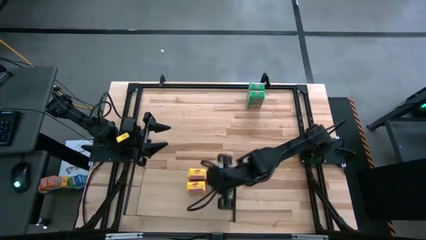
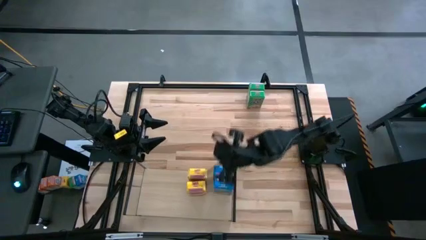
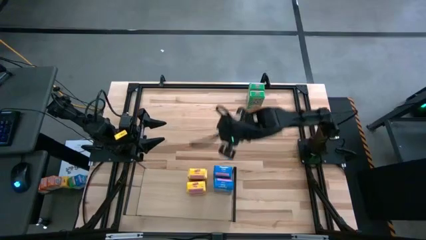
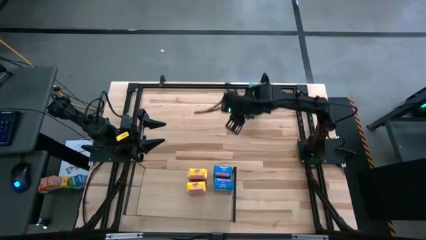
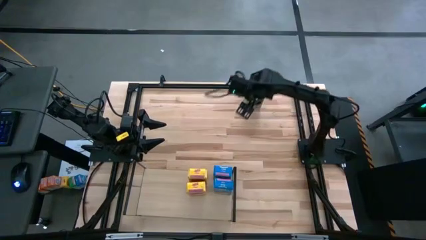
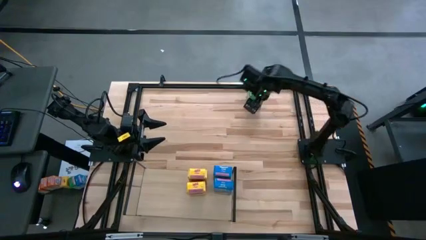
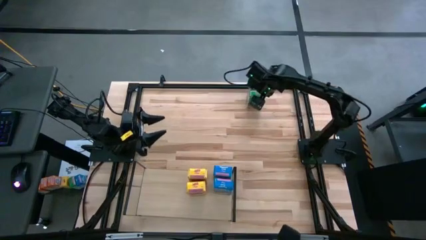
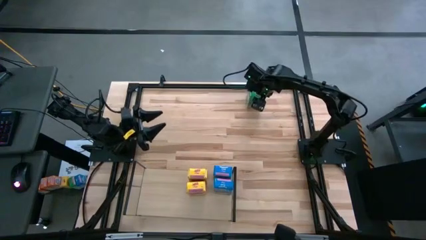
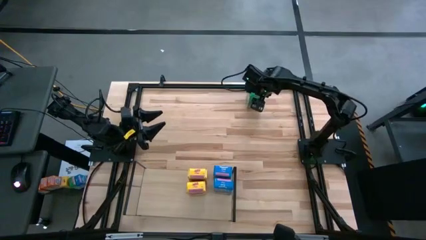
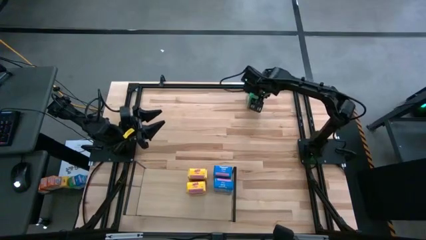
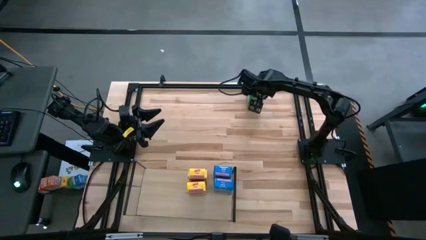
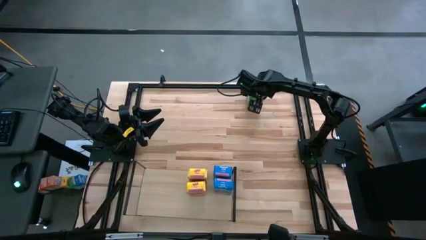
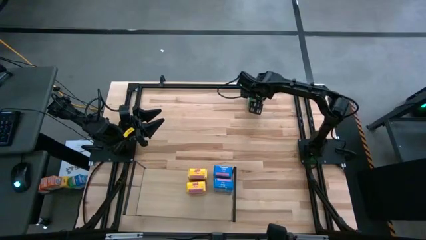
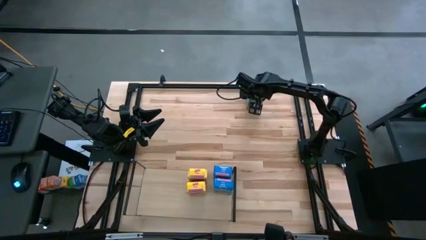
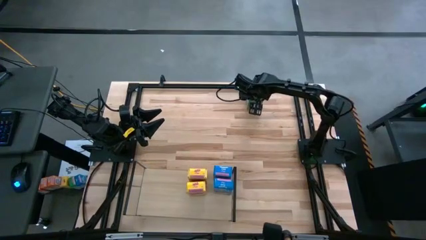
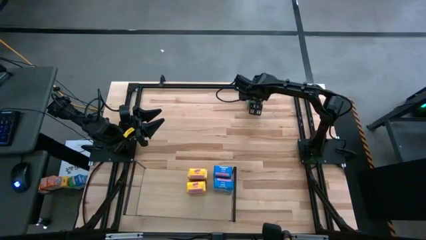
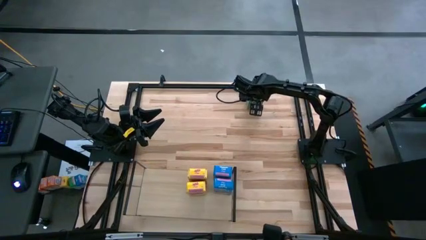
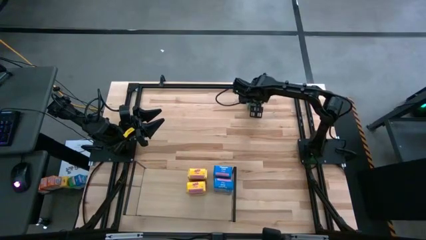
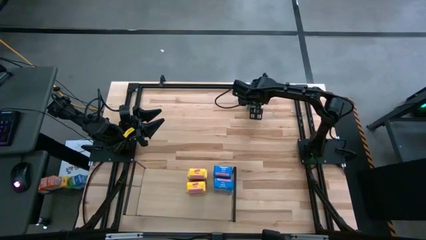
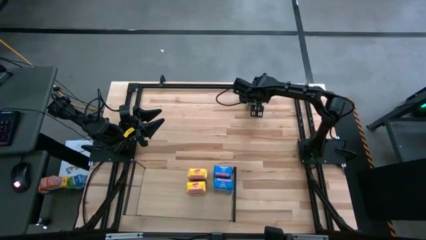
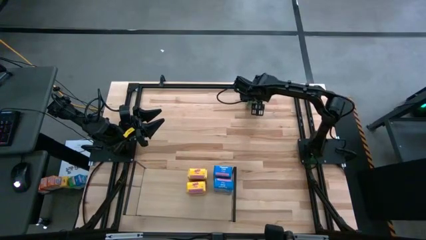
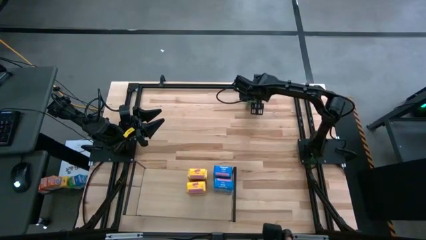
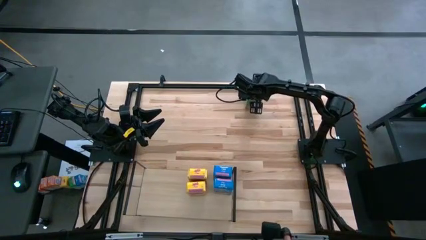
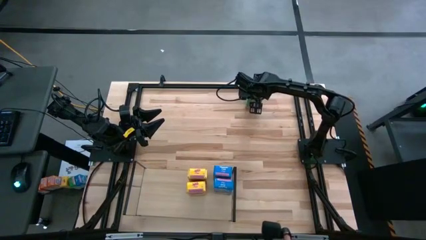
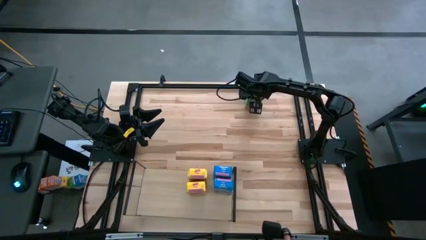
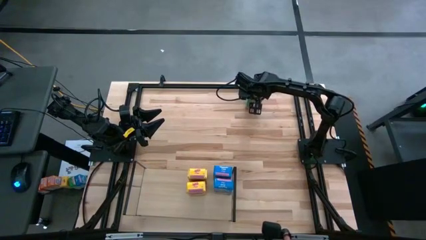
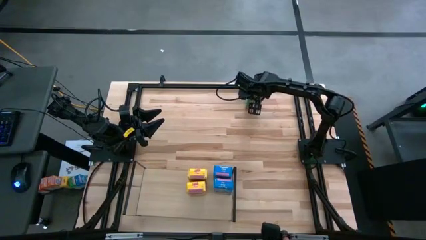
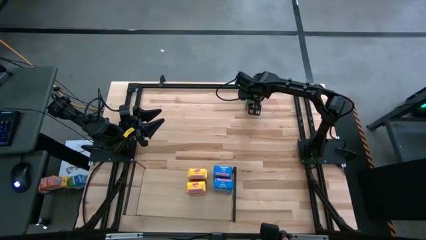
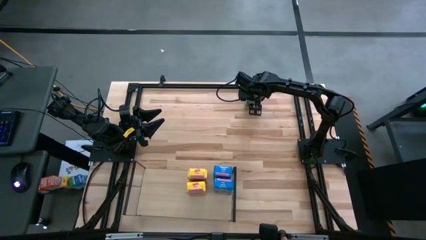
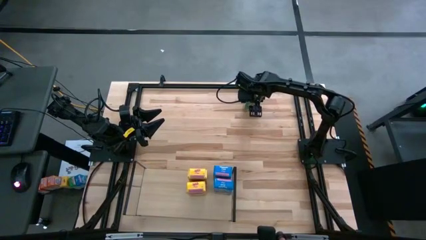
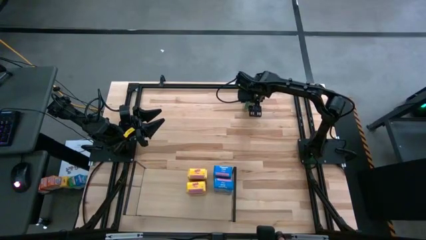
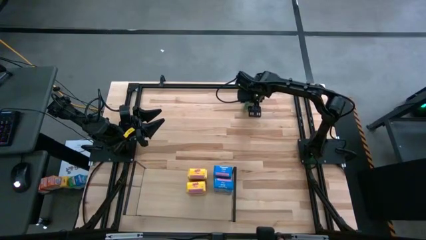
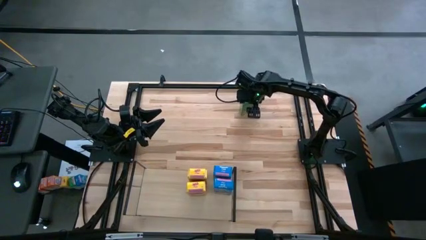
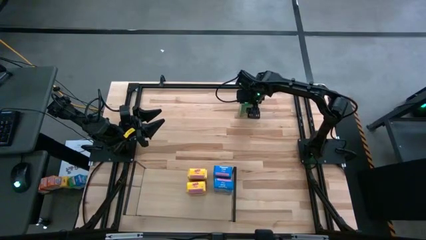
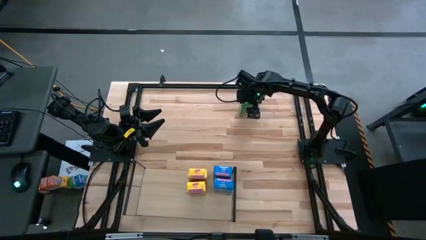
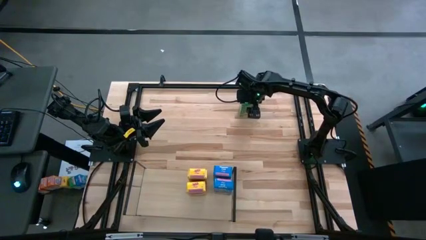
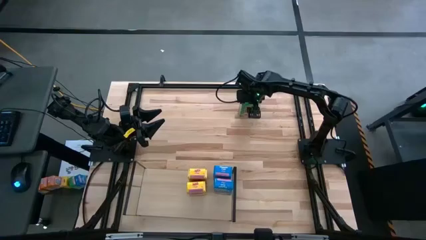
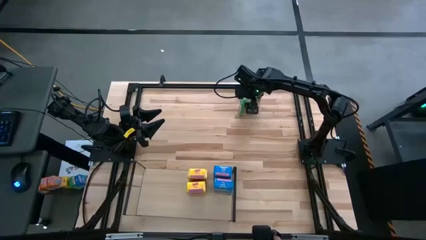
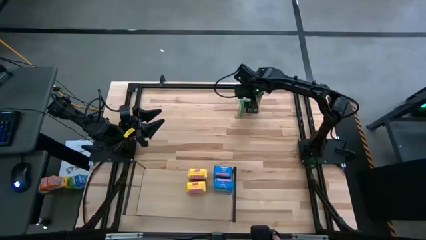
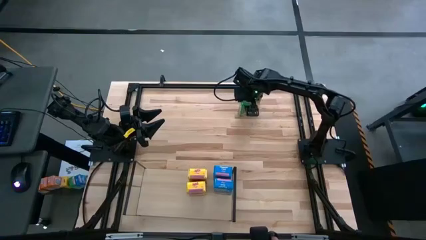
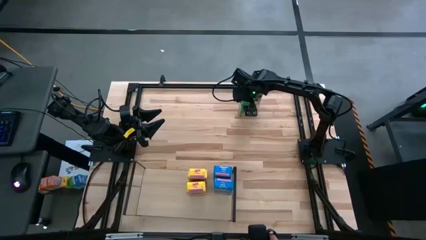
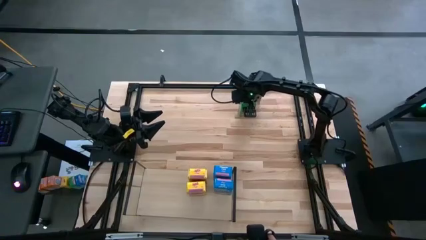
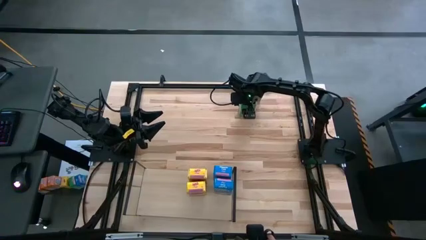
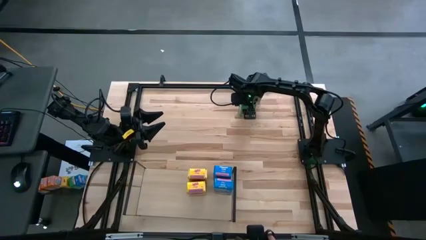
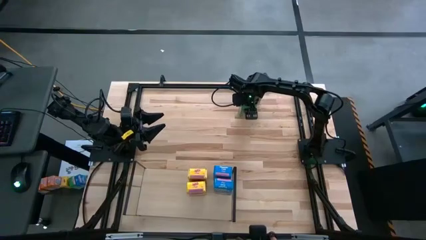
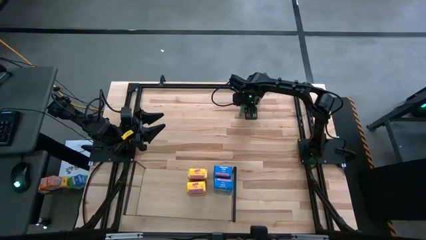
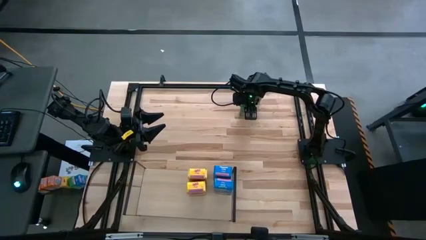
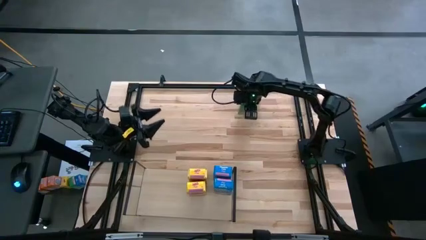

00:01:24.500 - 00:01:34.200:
Task: Stack cereal on shelf
Put the bottom green cereal box on the shelf

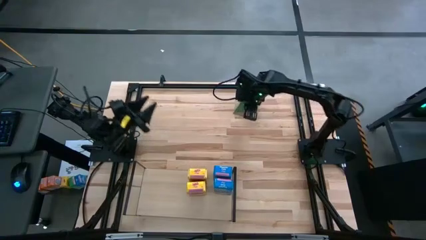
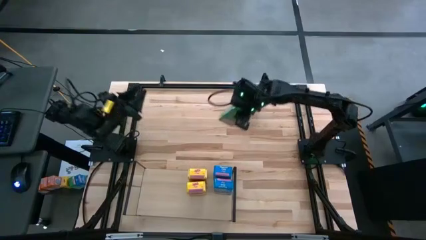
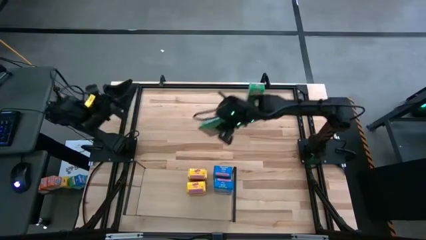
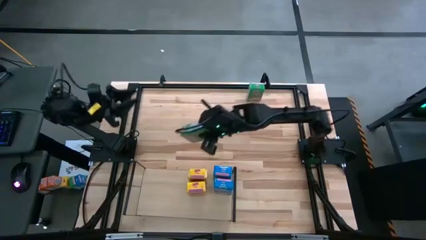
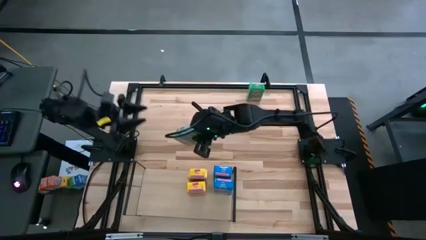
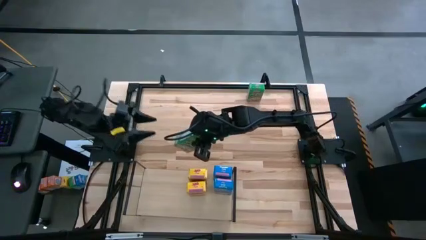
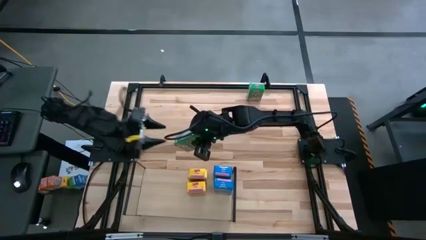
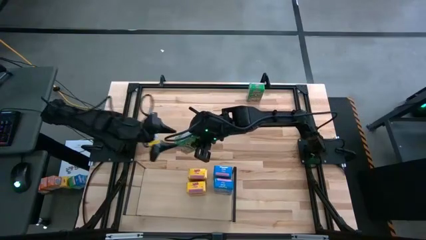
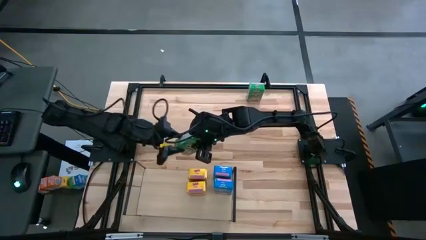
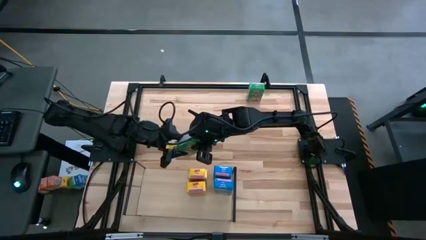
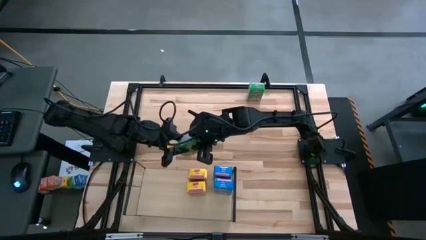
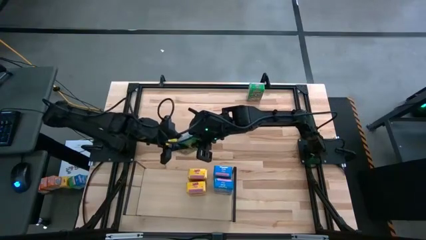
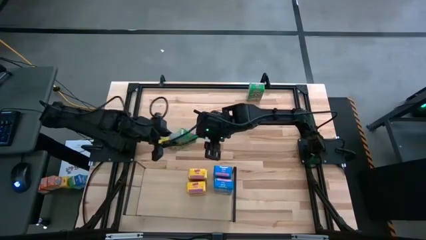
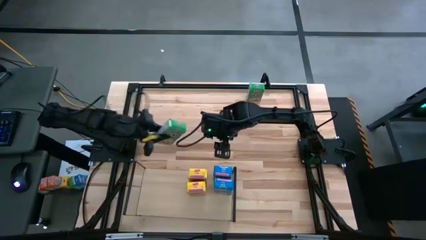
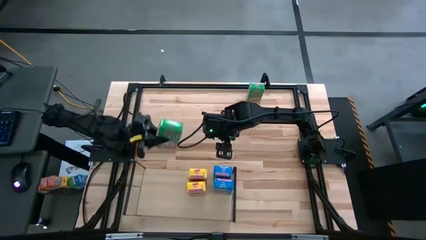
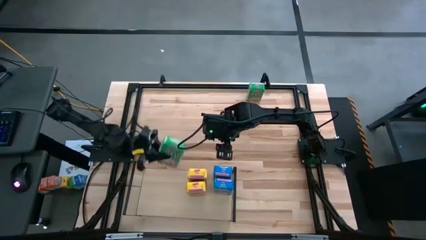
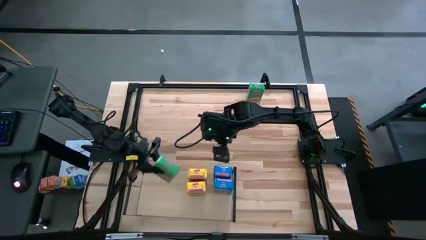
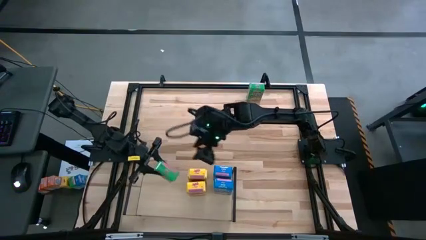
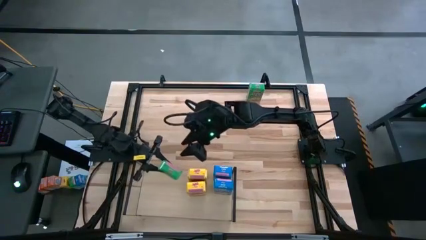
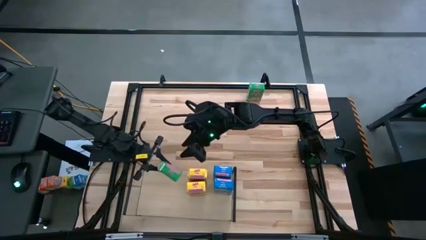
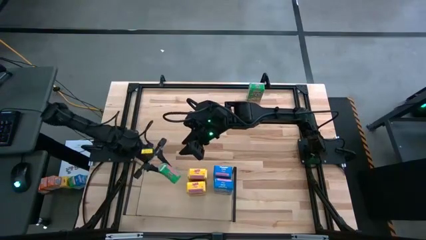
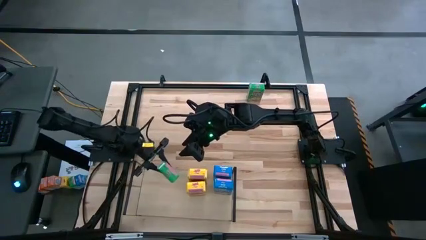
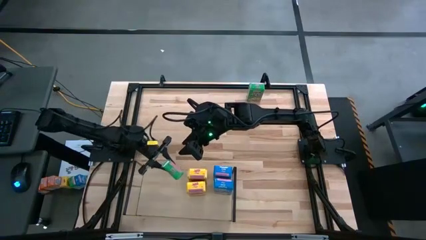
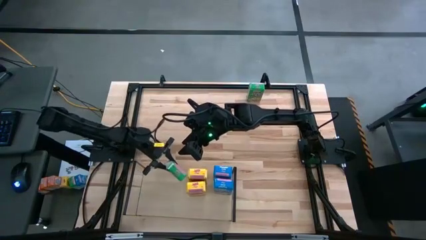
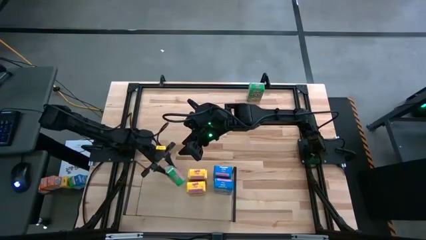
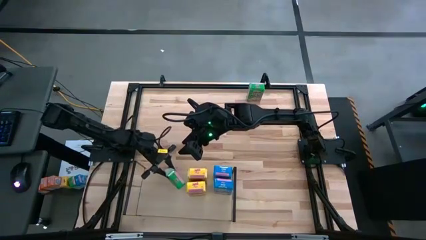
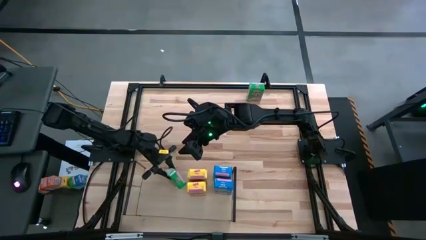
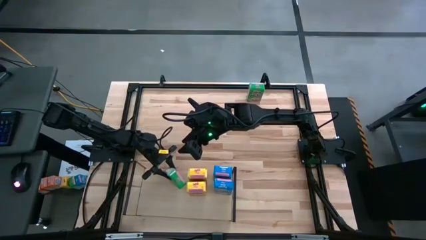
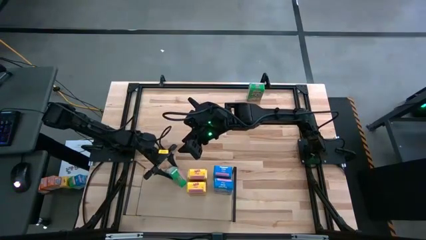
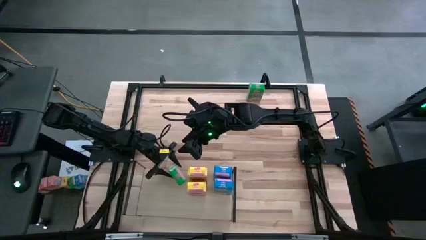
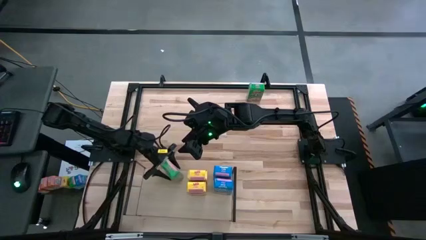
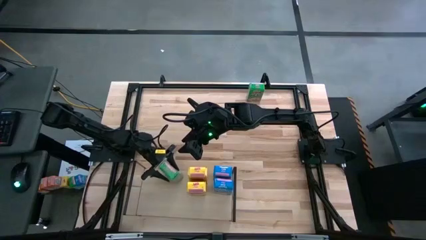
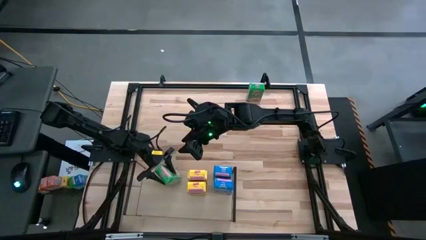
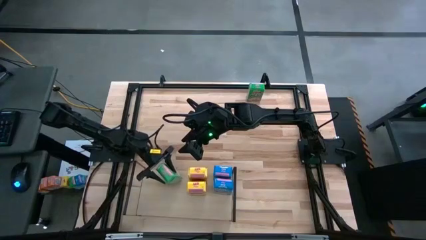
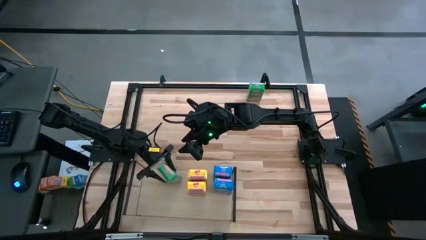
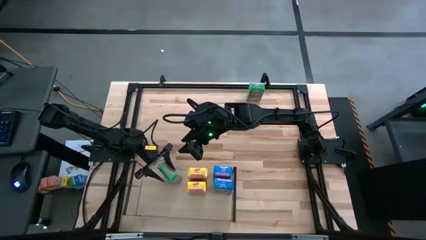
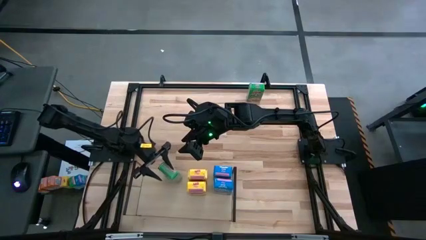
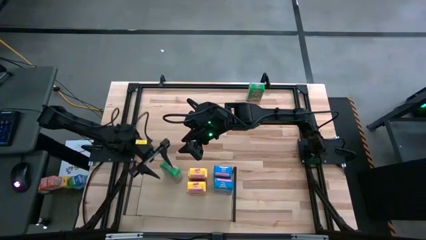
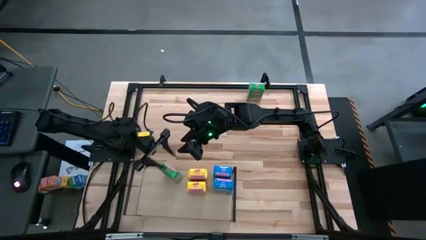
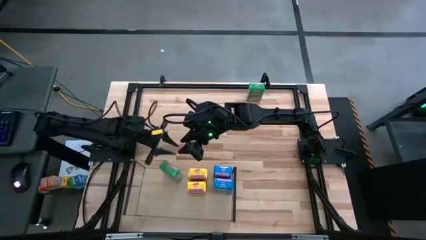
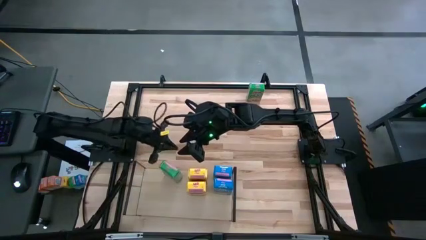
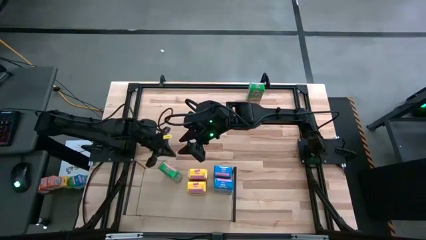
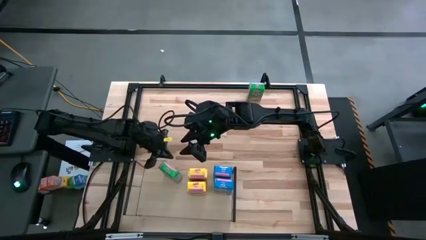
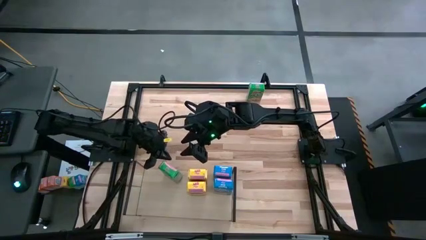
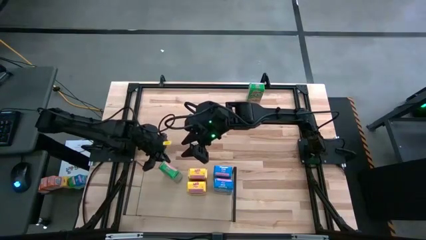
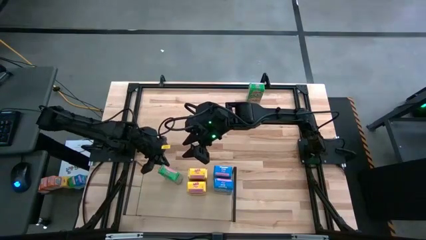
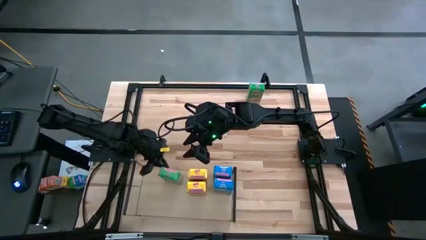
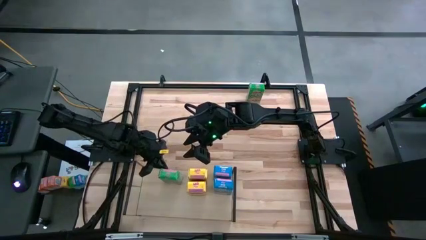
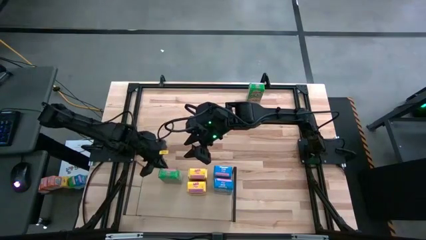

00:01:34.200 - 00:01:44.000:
Put the bottom green cereal box on the shelf
